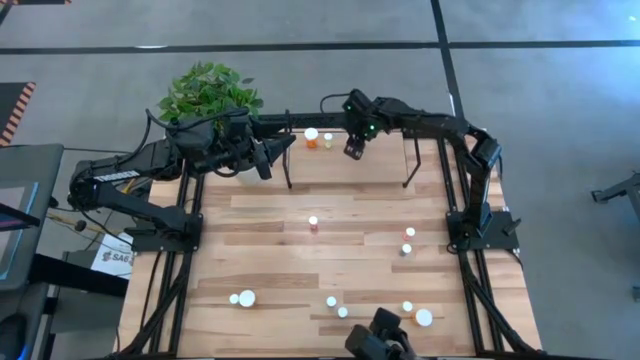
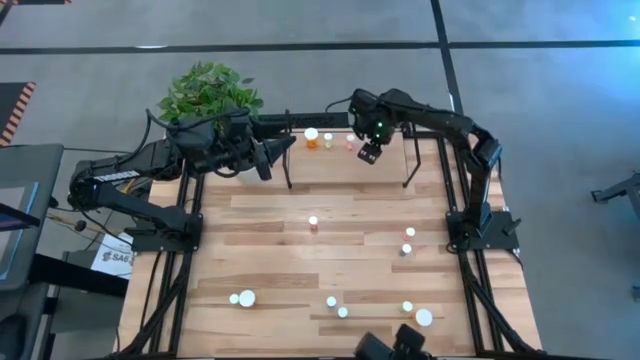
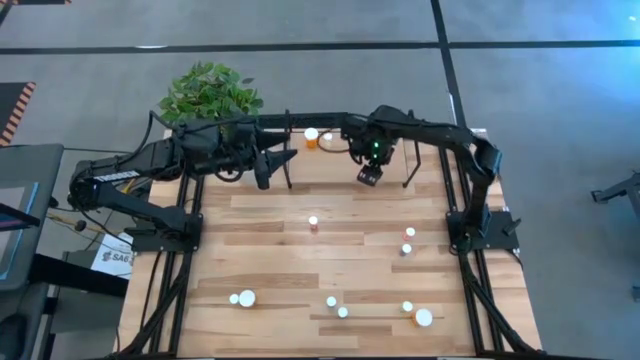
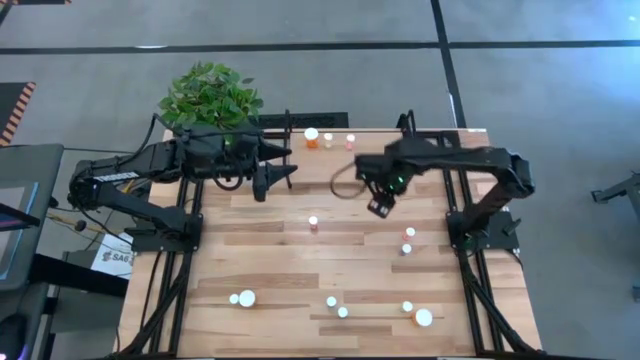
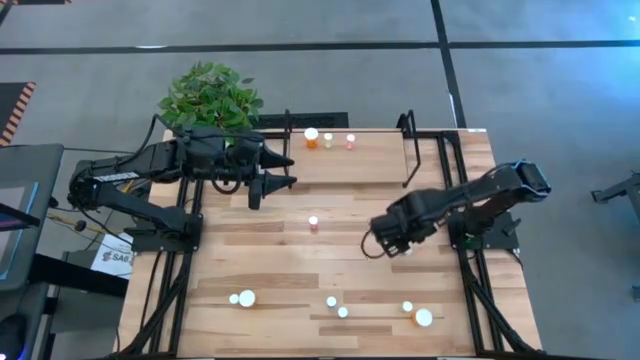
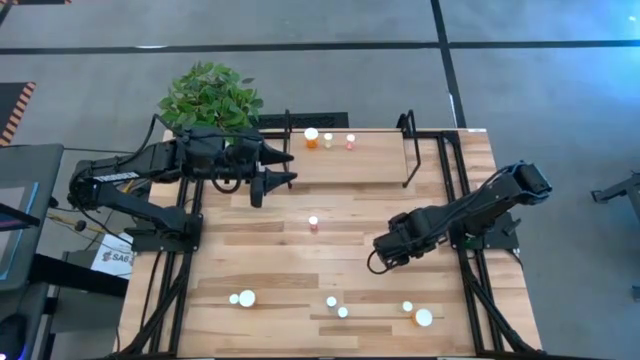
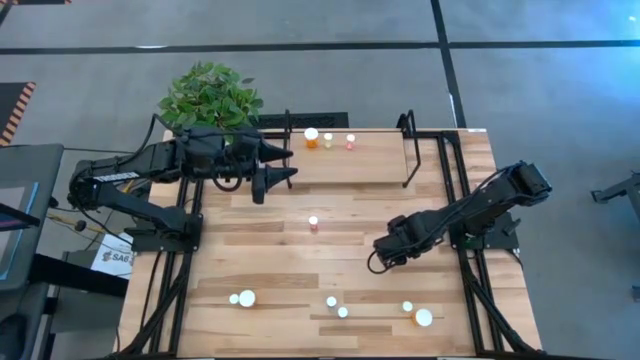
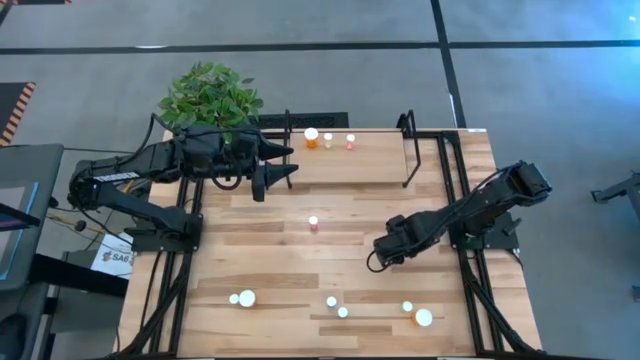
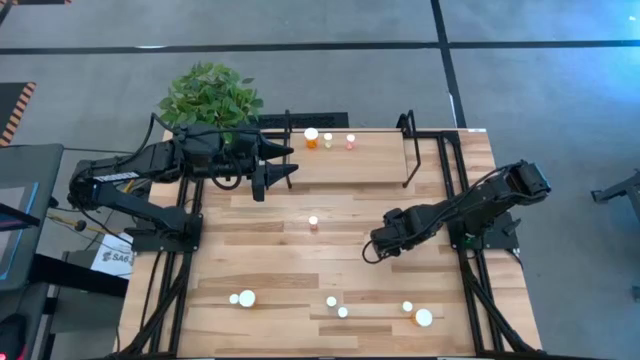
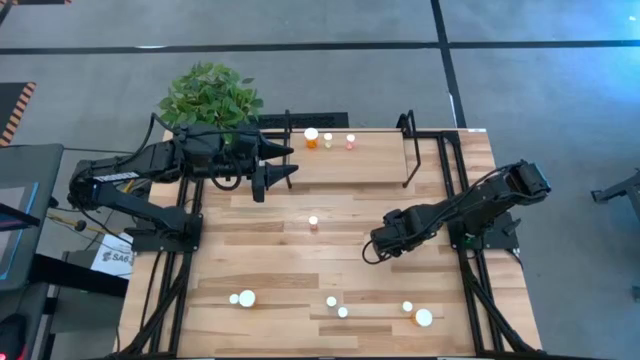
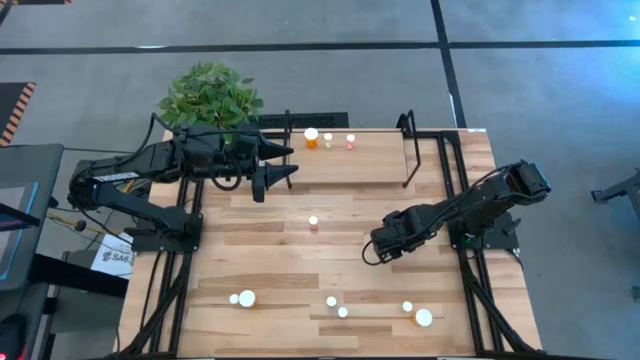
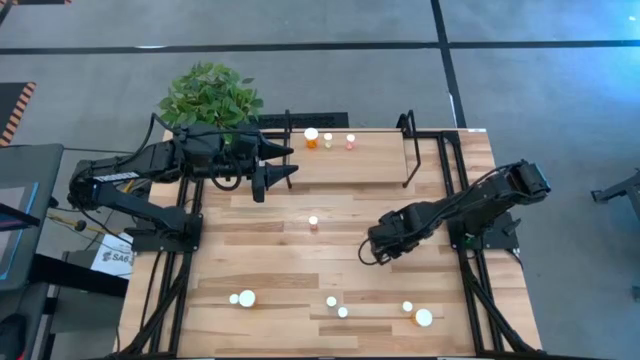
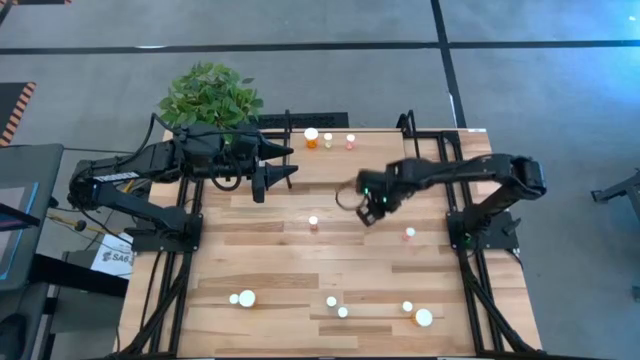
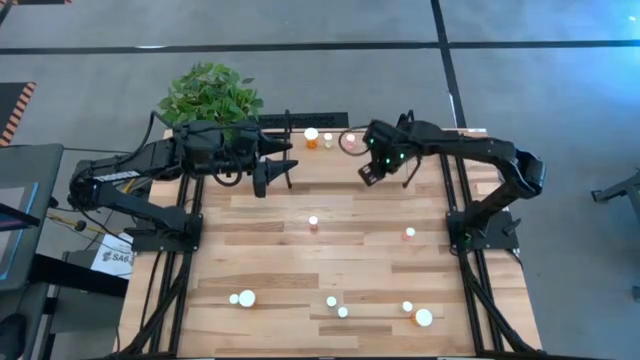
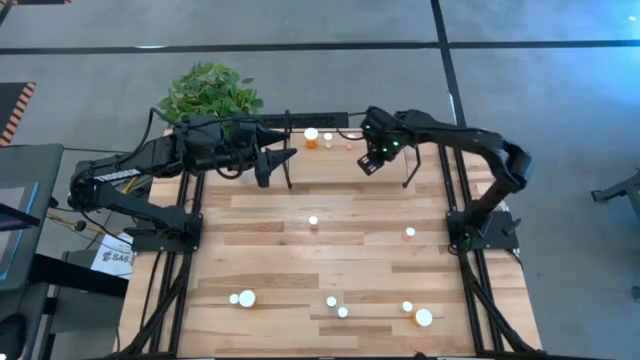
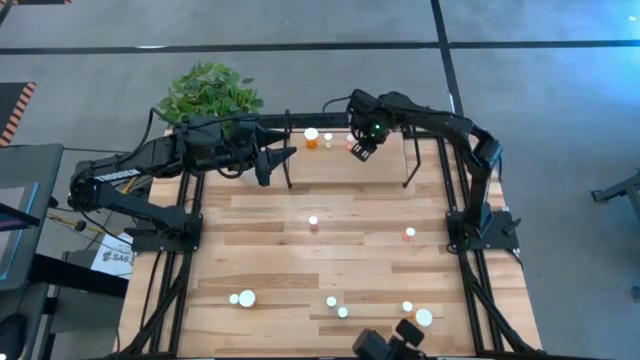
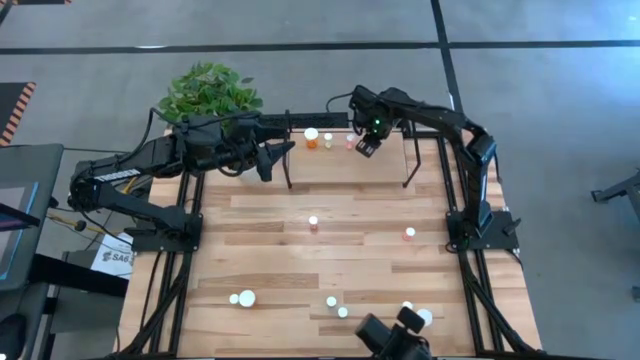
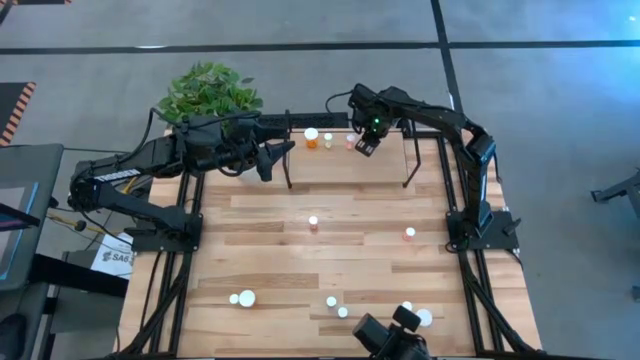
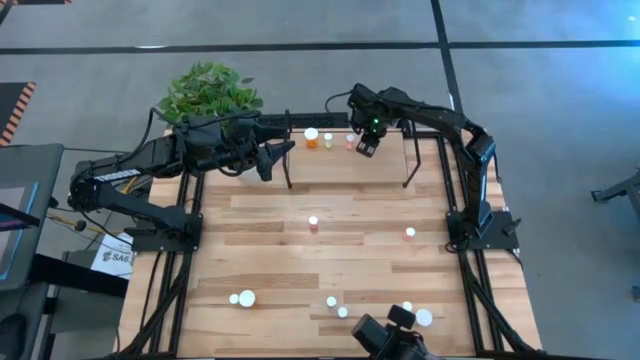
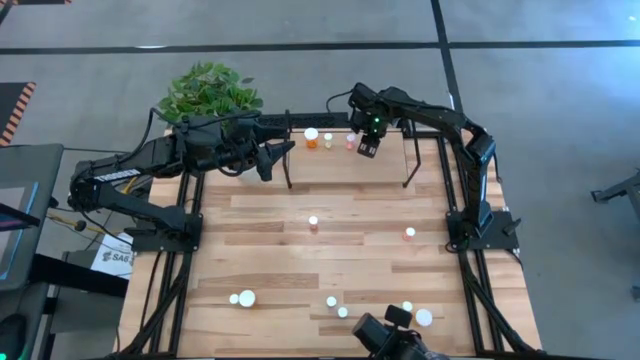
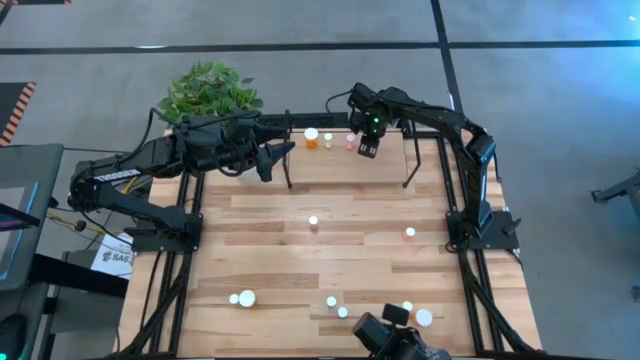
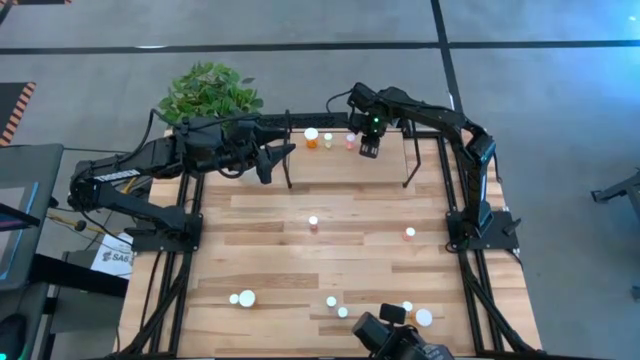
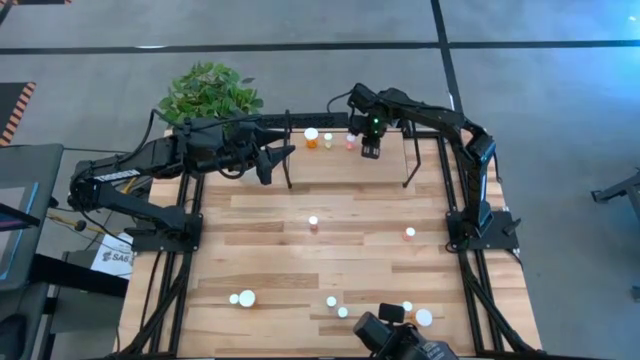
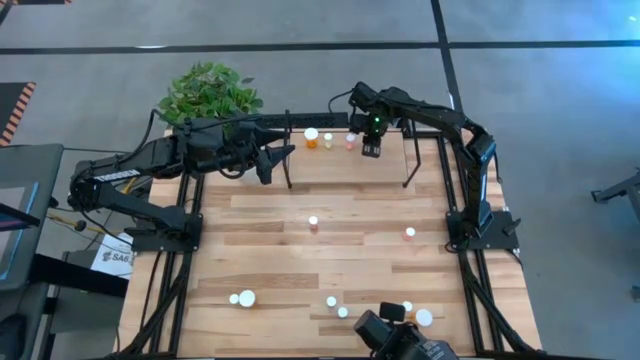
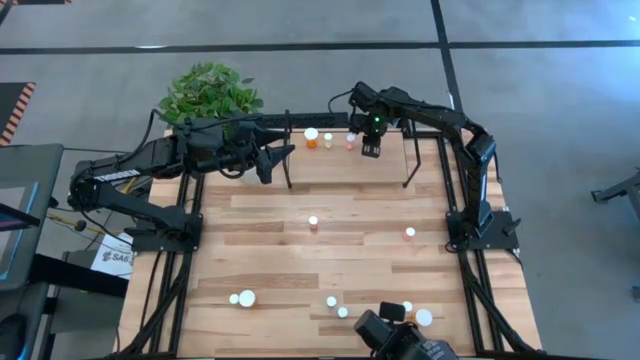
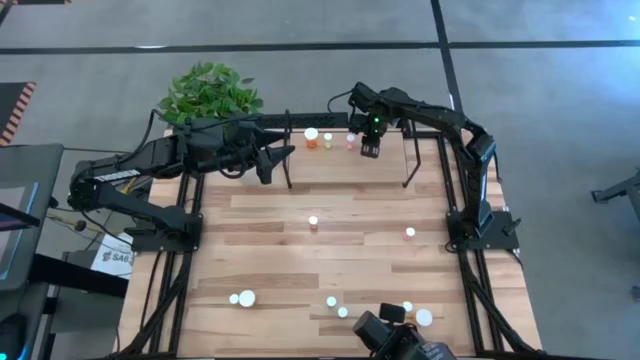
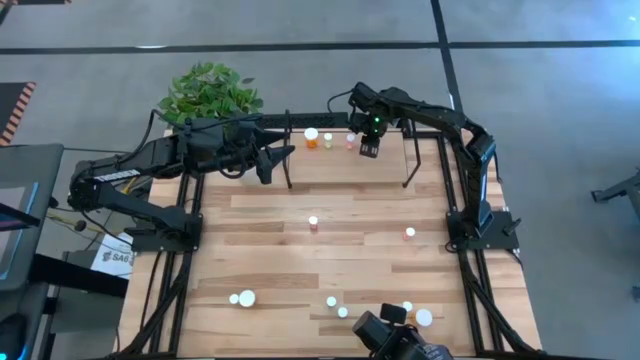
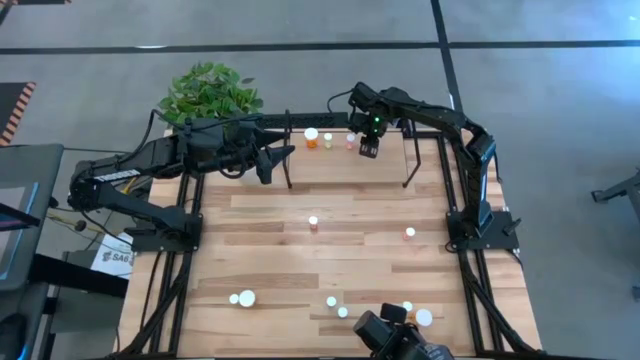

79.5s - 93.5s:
Task: Pick and place medicine bottles onto shelf by color
Put the top blue pill bottle on the shelf

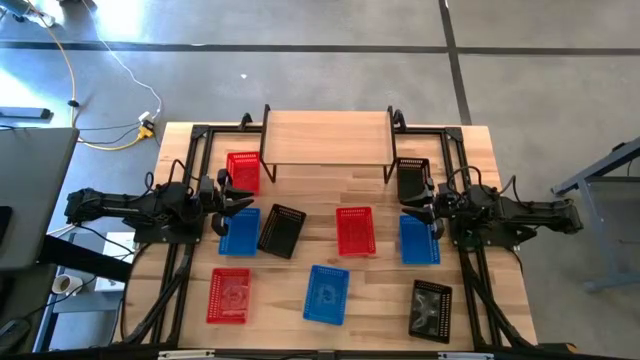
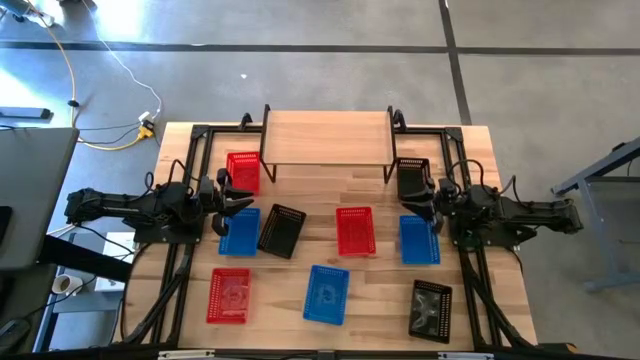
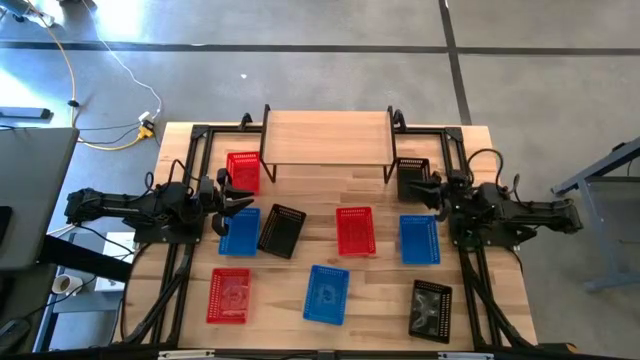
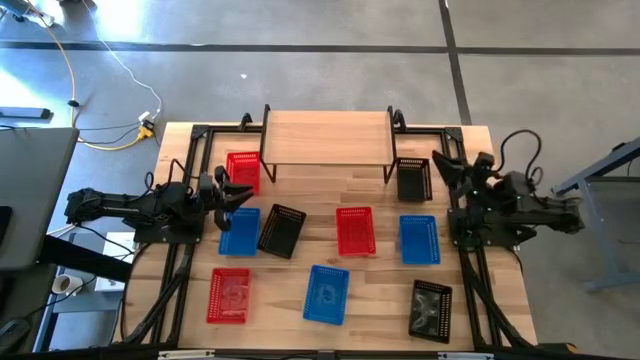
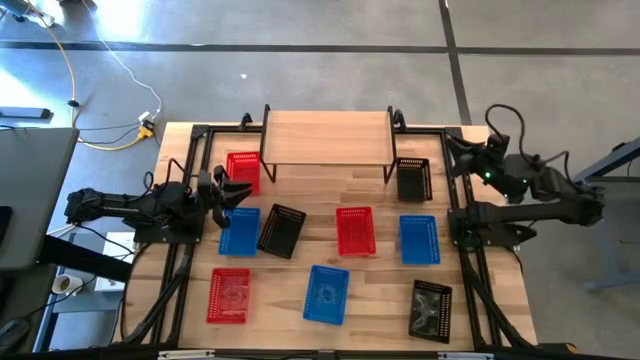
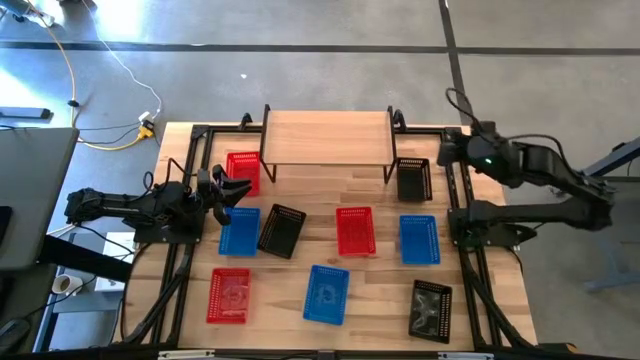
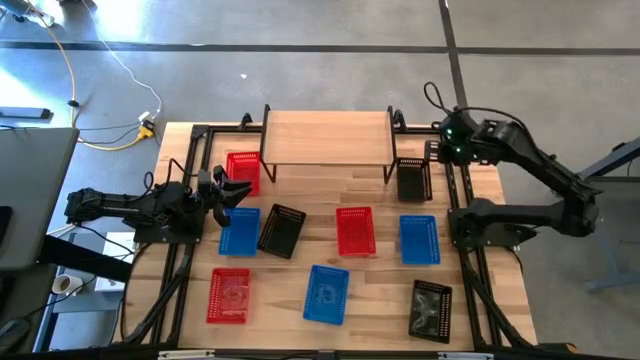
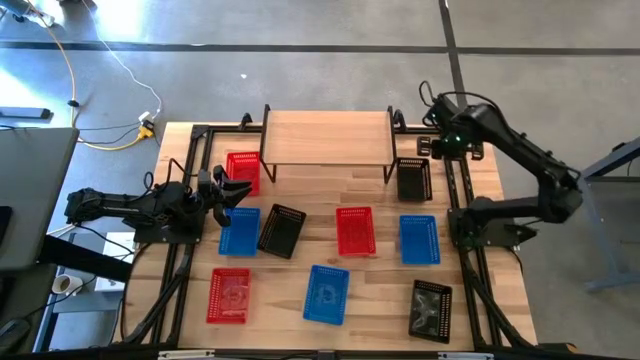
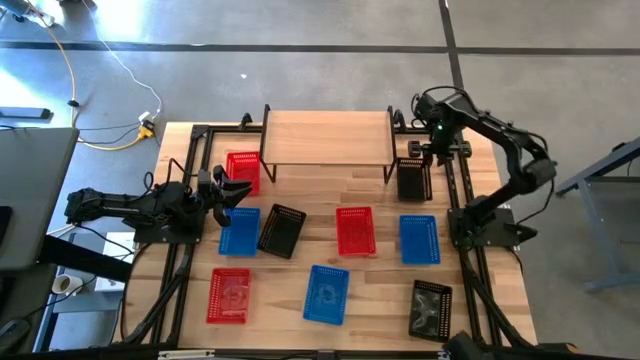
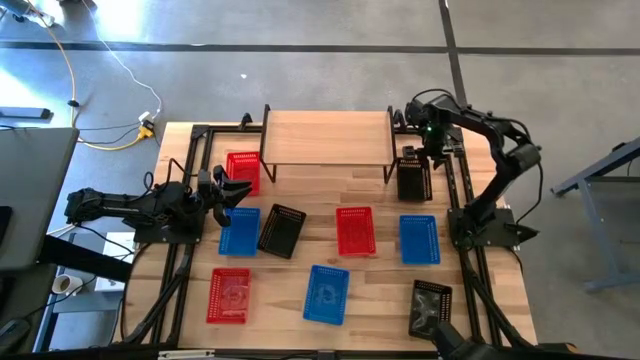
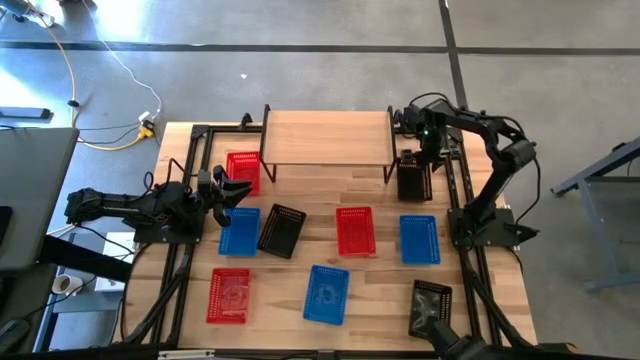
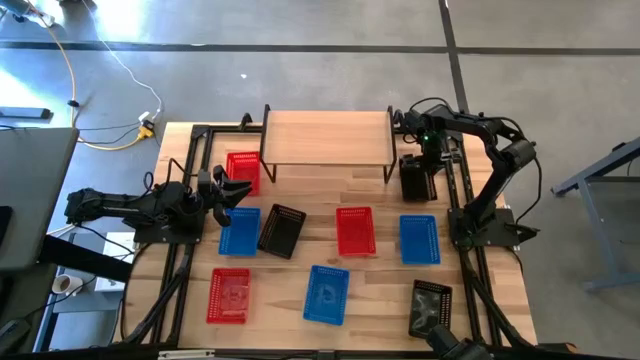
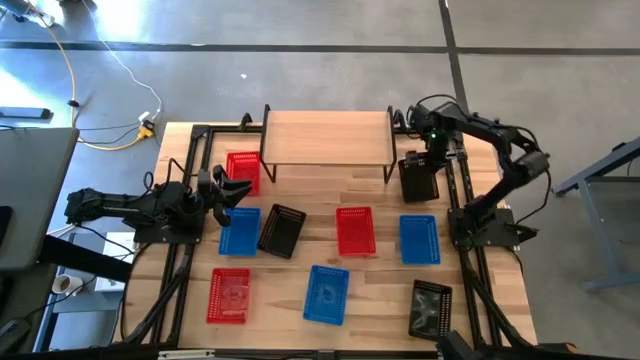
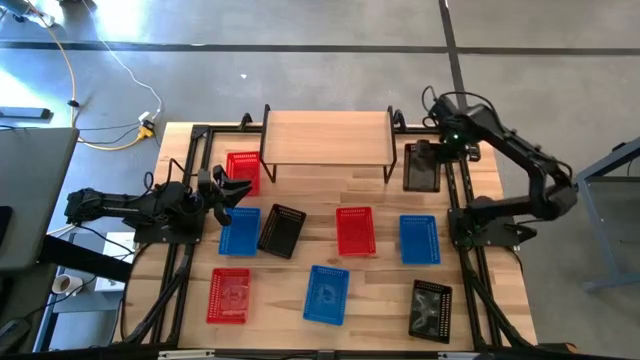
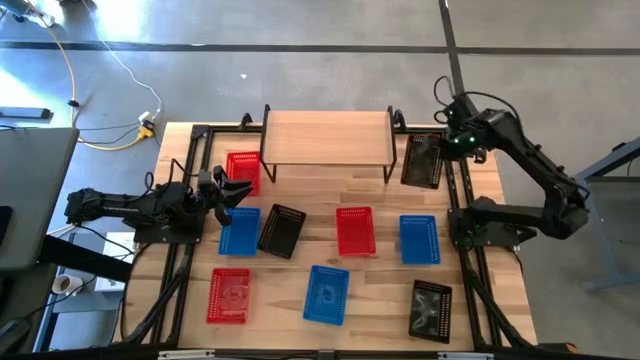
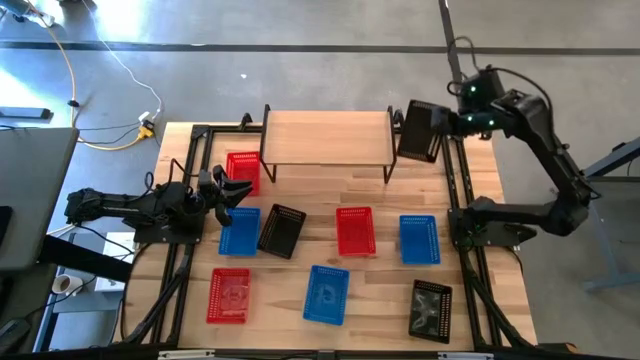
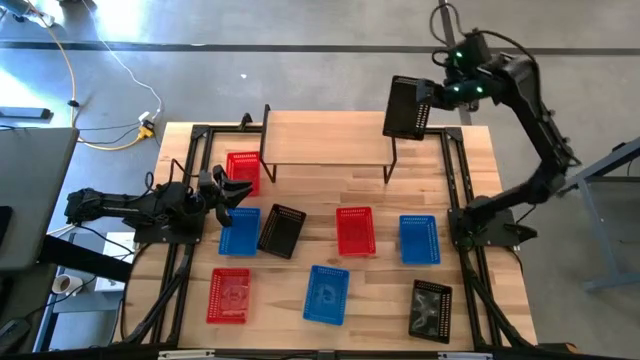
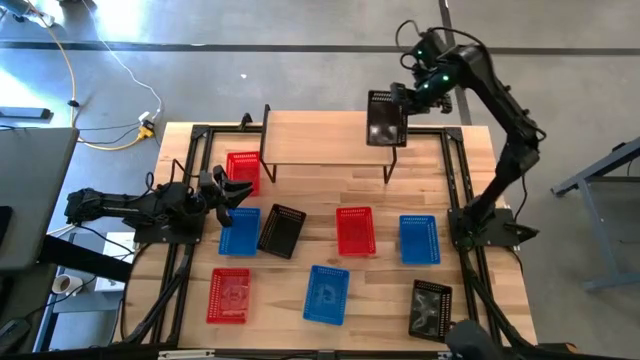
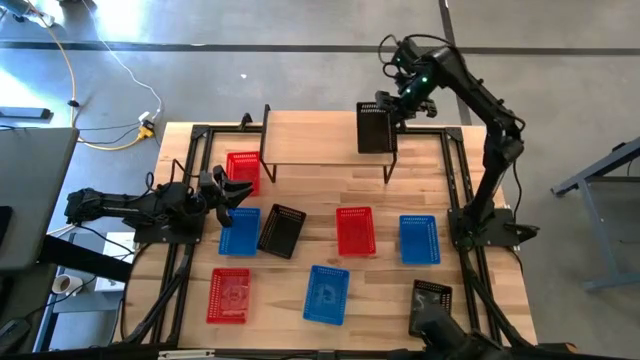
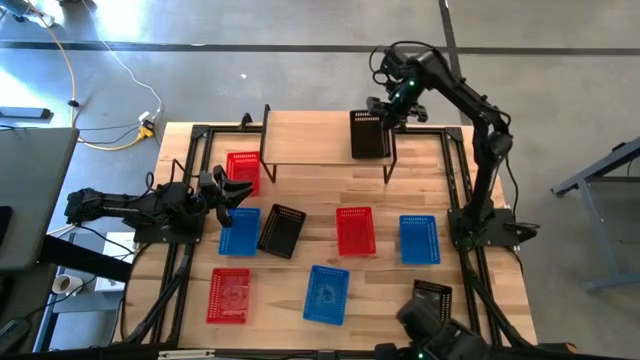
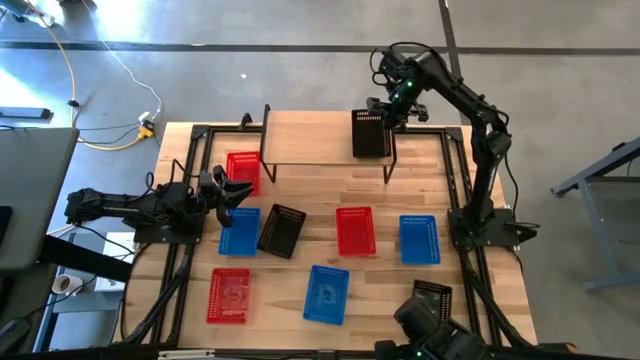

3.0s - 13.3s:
Task: Stack baskets on shelf by color
Put the top black basket on the shelf
